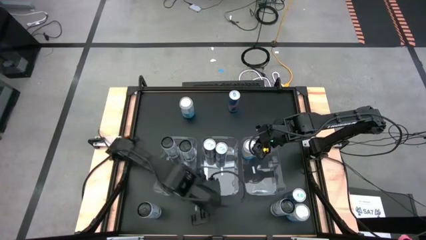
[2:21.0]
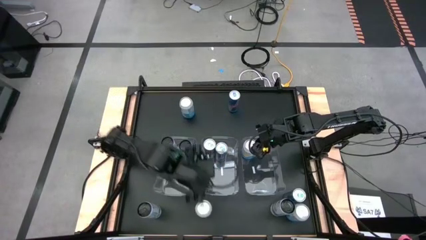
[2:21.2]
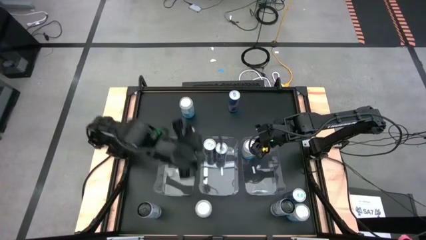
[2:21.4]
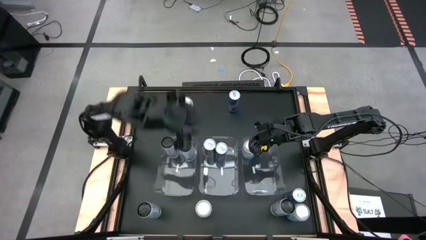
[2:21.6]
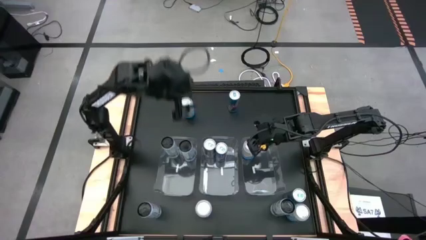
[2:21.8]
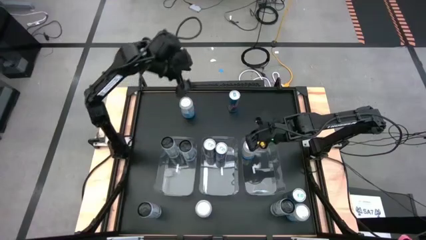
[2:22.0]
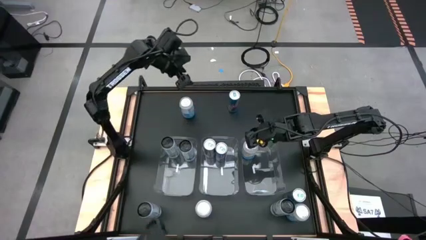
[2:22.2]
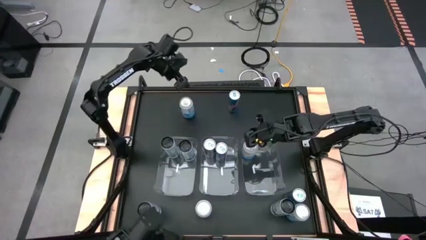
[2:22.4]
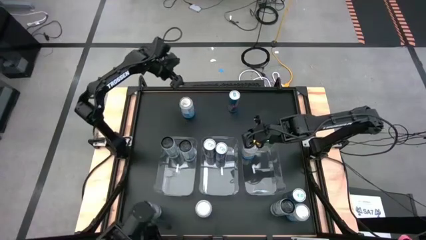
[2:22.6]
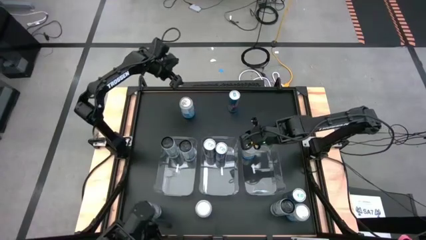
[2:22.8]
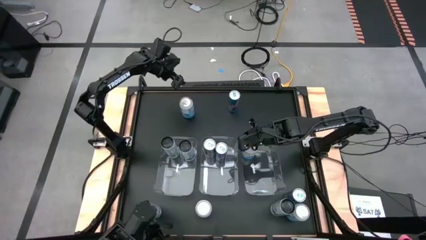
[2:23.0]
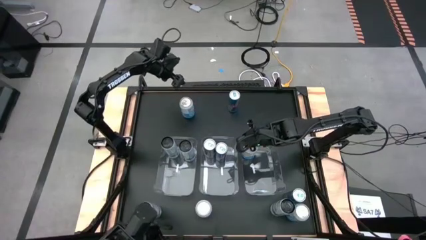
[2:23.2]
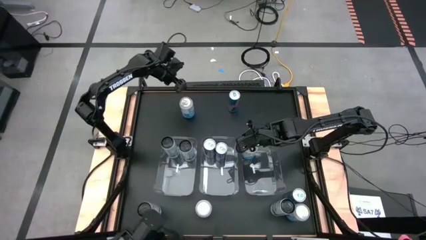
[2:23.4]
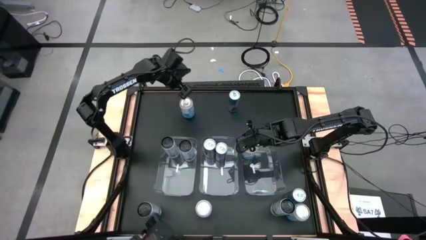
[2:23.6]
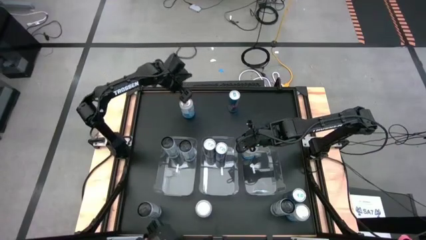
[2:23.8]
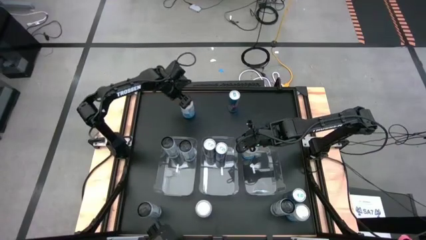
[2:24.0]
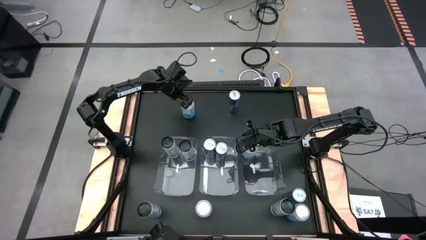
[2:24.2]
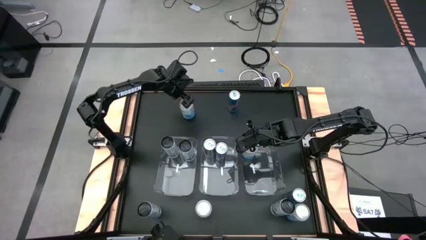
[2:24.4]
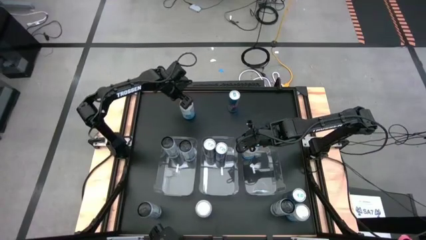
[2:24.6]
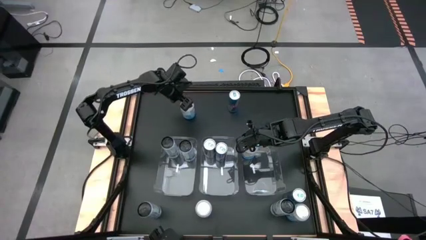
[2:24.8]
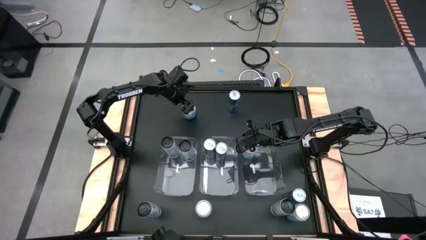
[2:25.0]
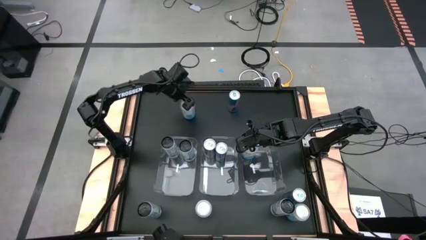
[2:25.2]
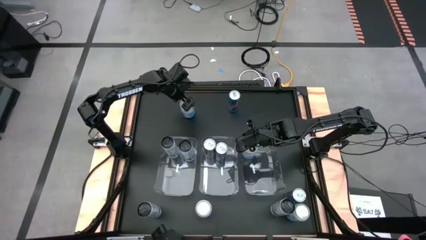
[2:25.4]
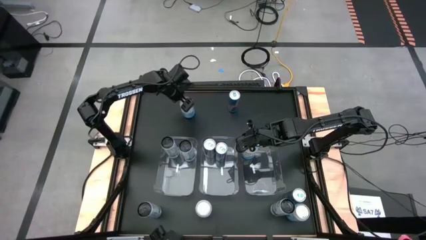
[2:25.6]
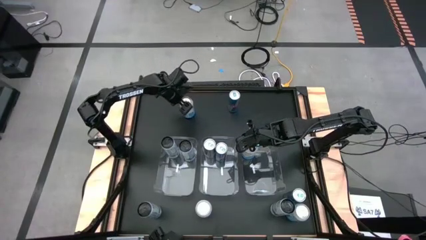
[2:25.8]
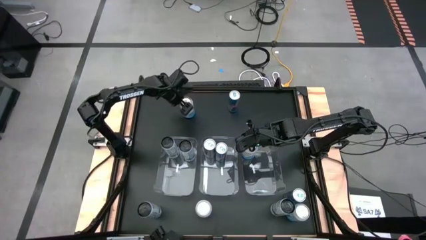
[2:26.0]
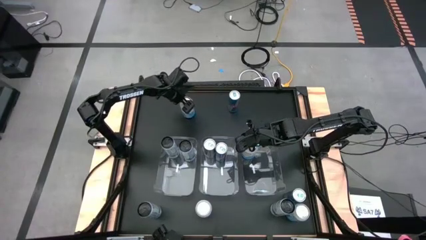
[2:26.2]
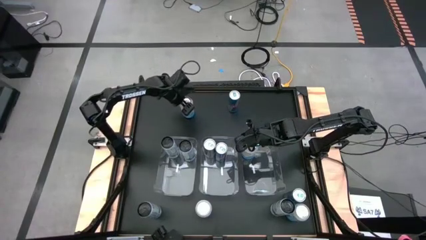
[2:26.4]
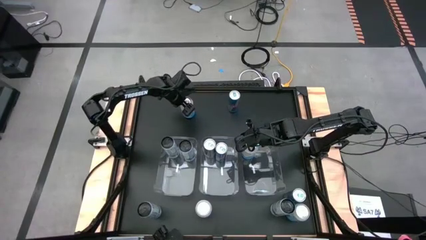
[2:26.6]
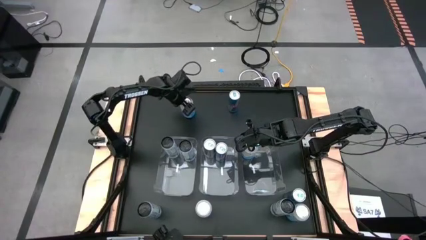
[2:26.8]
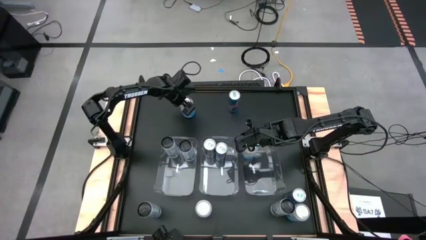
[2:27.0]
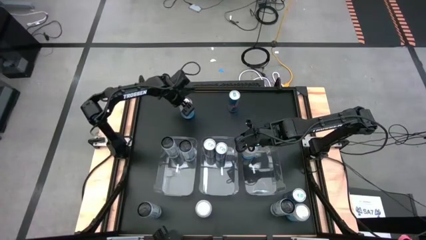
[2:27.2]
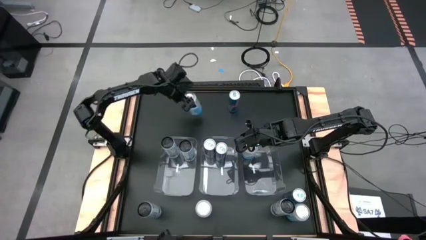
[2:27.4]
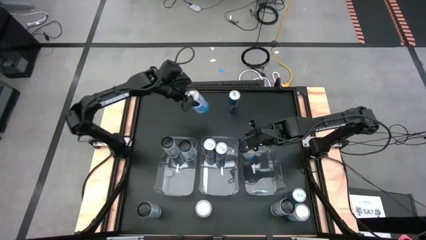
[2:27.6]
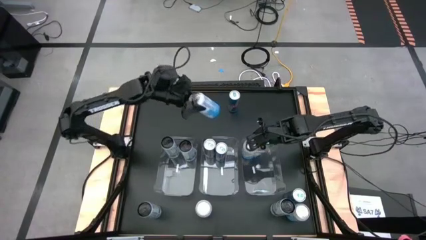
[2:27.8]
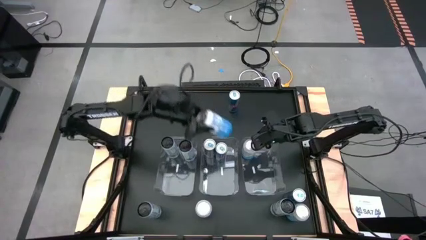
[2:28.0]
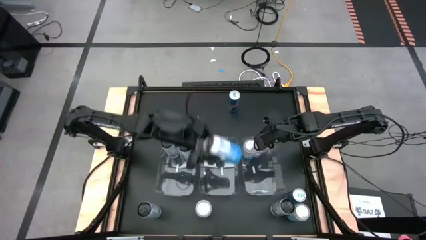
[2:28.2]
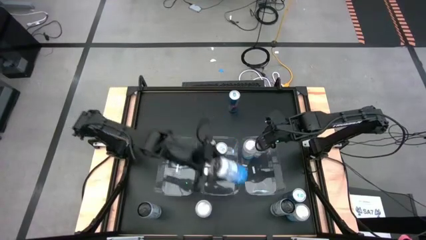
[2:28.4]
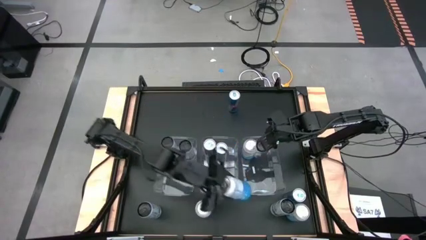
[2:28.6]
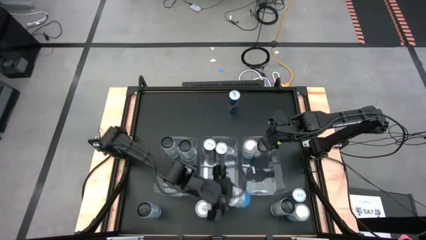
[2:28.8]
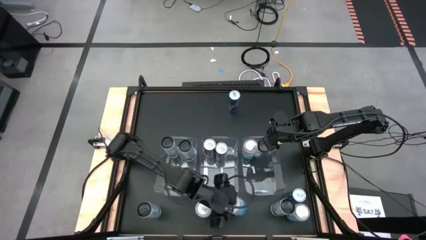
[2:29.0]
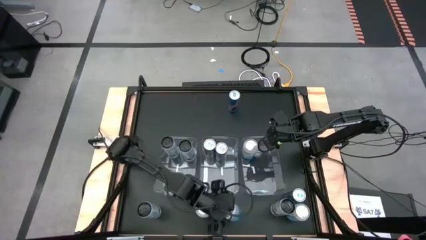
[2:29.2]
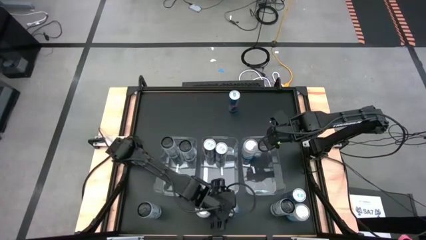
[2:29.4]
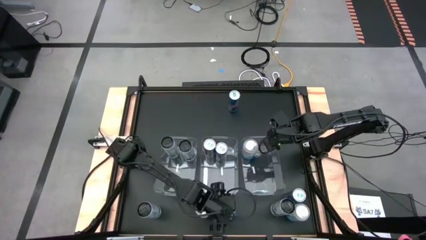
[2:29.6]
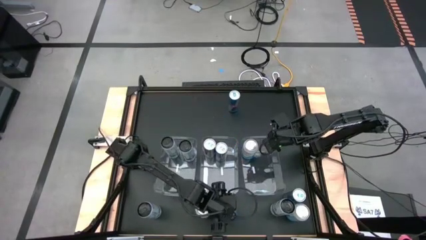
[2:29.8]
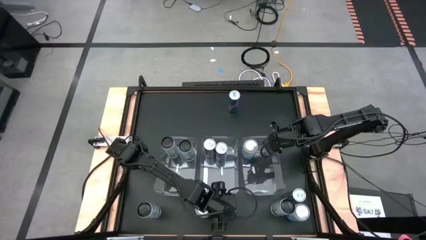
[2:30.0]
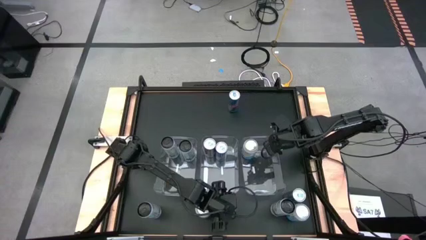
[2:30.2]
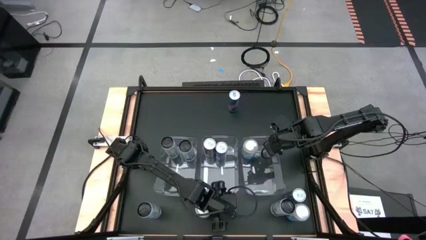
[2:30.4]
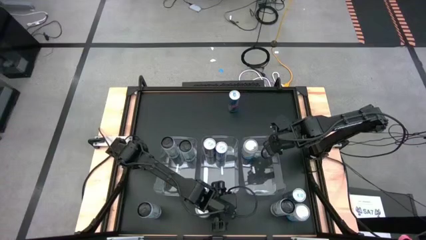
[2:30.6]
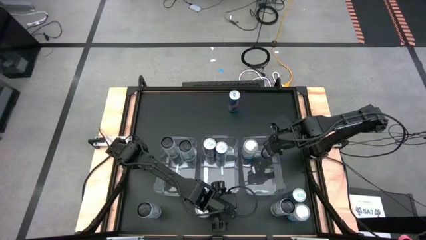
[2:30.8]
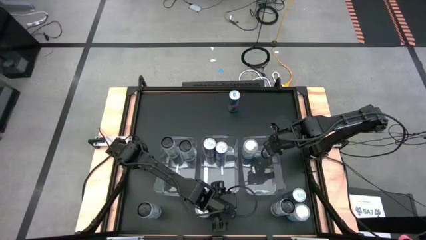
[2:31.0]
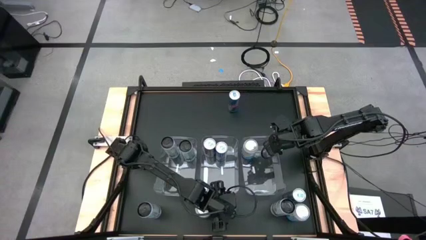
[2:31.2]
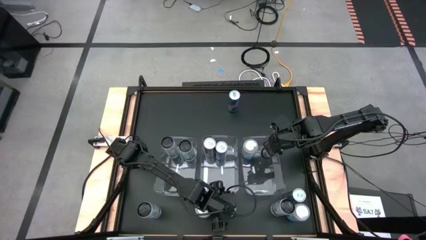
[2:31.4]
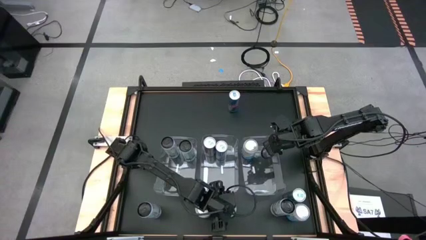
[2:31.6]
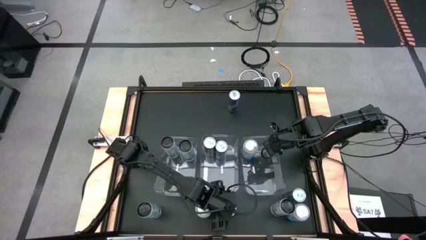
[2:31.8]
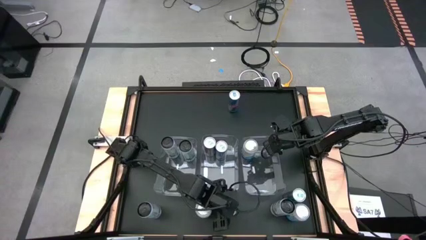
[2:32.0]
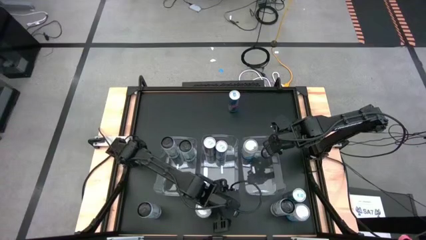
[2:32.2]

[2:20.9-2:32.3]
Task: Sort soda cans
Move the top white and blue soda can to the bottom of the table

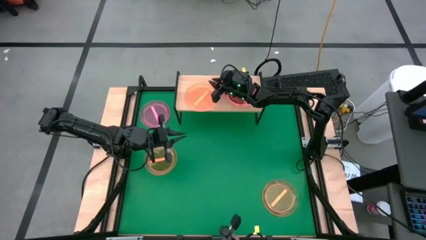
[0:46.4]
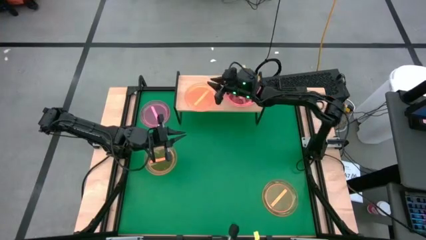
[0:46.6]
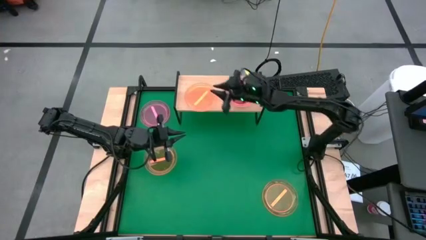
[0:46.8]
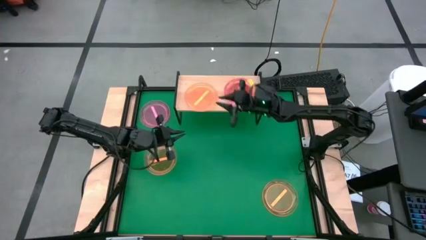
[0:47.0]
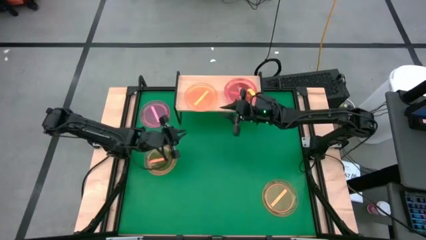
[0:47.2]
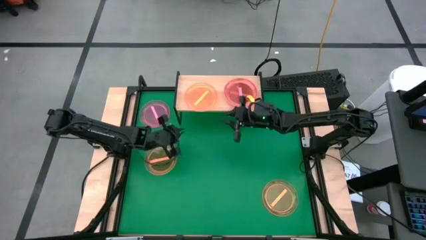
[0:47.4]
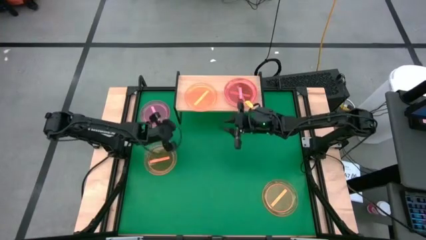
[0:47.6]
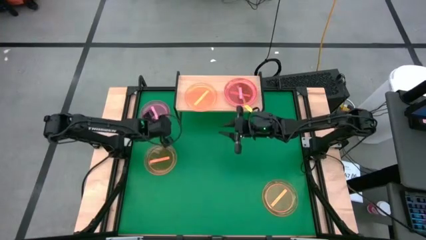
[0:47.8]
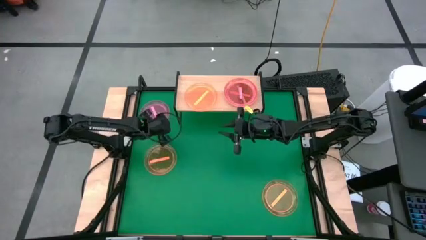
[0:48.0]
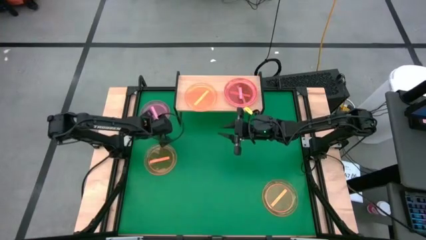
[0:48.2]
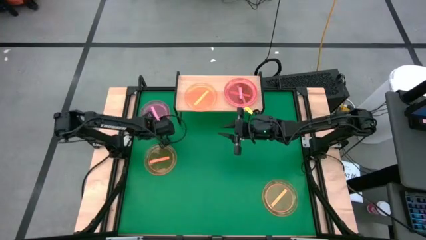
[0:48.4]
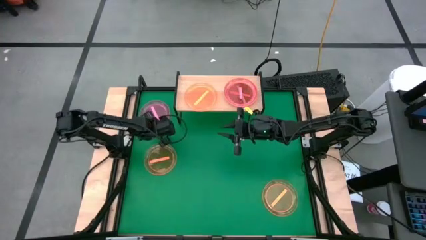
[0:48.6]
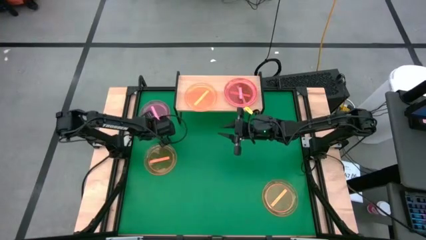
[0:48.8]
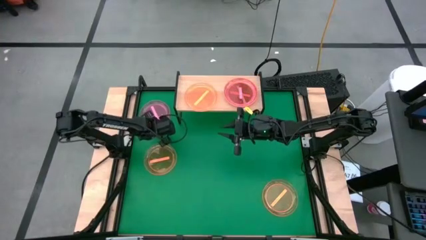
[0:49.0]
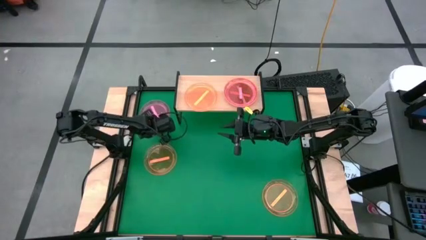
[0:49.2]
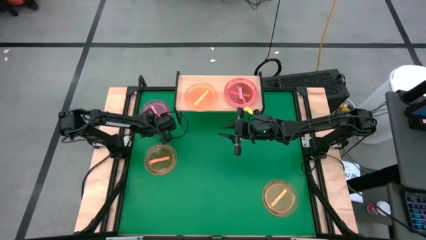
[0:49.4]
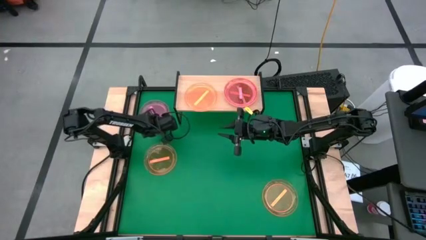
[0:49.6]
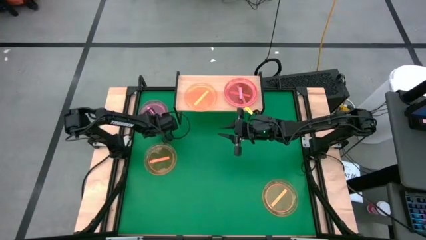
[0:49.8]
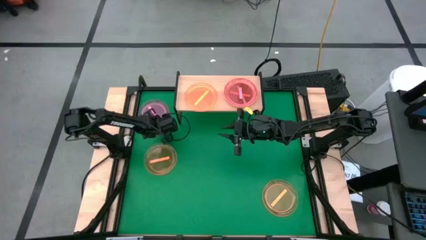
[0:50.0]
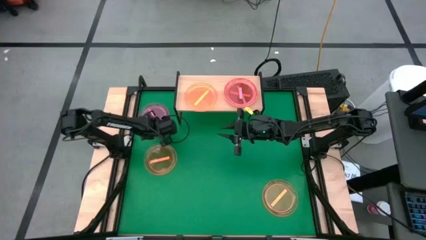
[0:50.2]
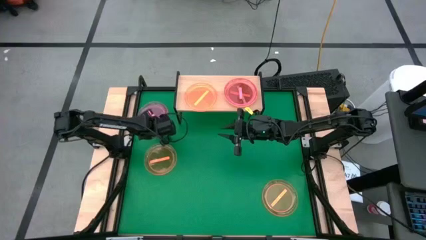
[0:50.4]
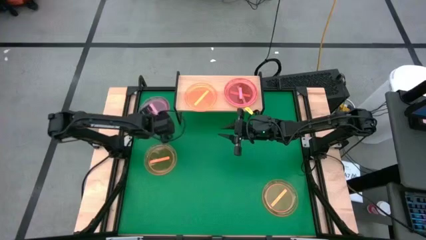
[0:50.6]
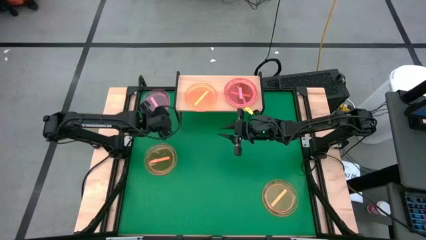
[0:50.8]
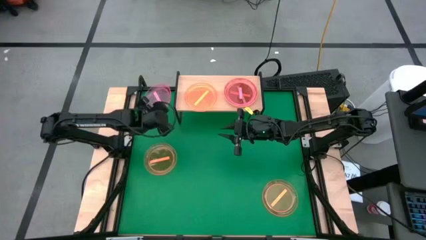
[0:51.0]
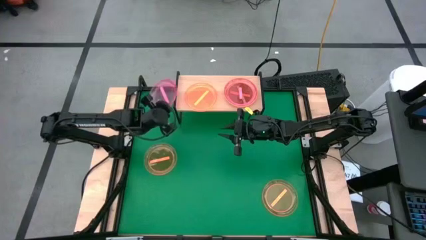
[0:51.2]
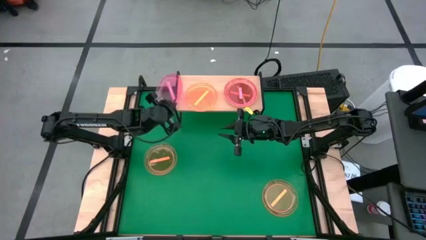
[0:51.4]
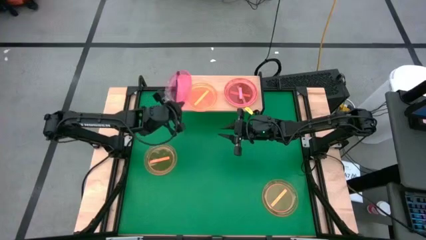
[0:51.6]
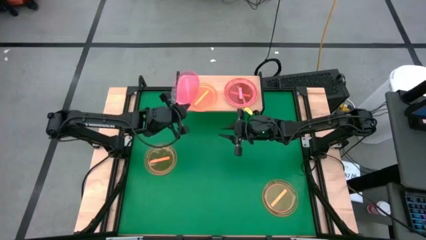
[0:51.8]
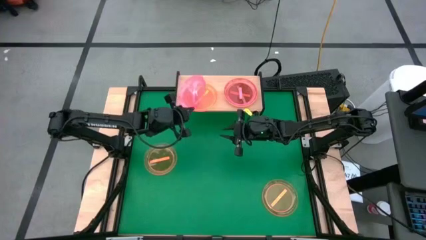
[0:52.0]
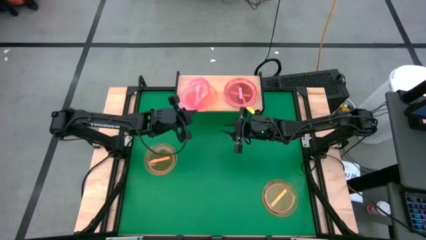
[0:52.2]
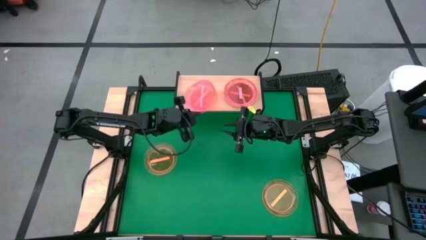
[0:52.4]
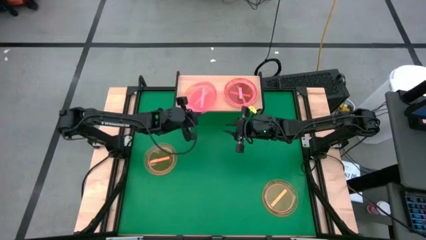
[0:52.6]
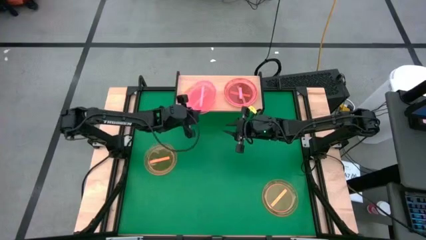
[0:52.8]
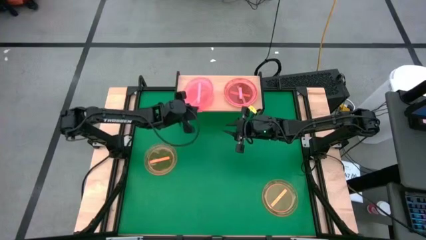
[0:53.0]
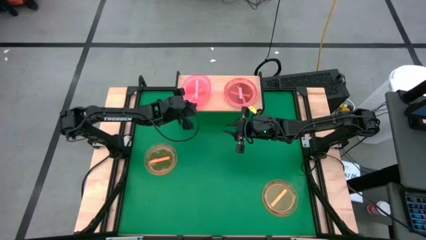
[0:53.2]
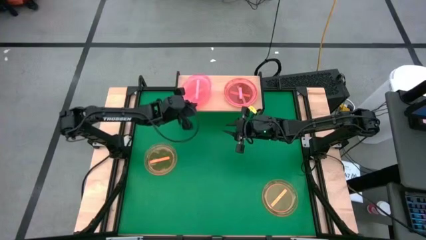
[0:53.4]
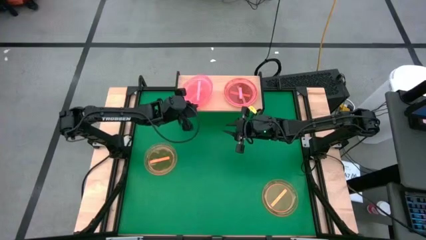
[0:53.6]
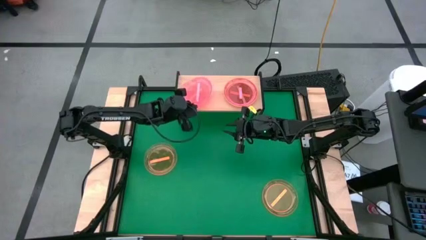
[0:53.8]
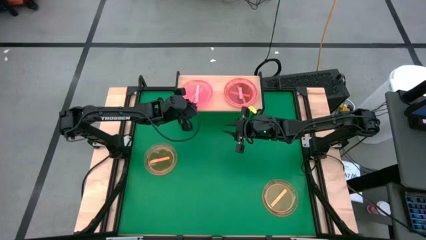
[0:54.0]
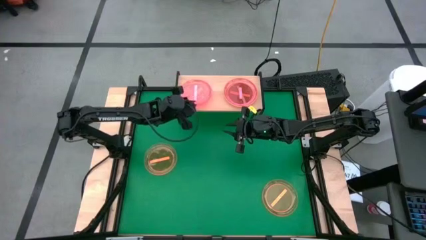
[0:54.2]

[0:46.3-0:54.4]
Task: Place and stack plates onto a shelf
Stack the pink plate on top of the orange plate on the shelf
